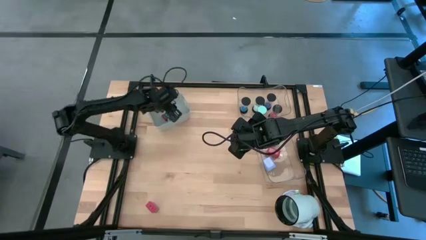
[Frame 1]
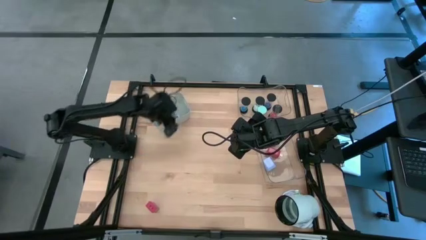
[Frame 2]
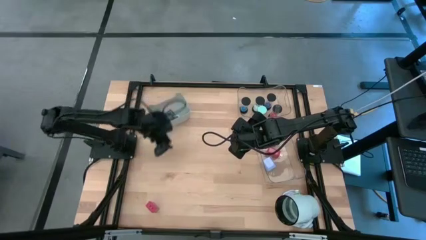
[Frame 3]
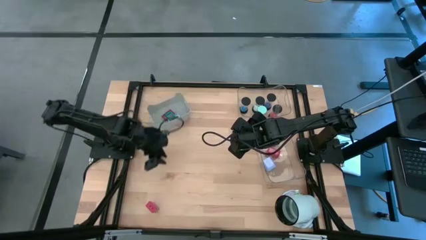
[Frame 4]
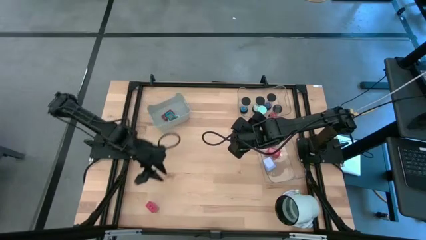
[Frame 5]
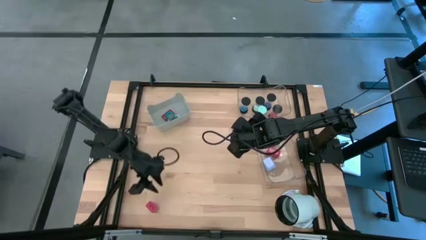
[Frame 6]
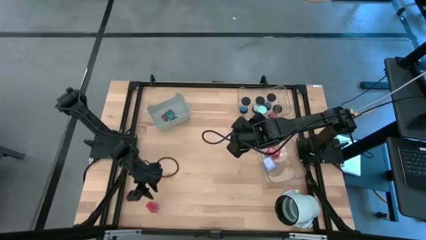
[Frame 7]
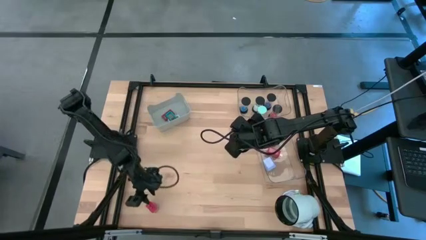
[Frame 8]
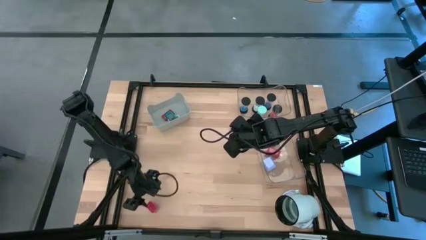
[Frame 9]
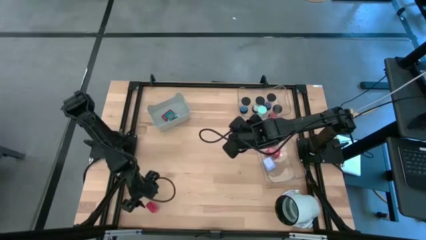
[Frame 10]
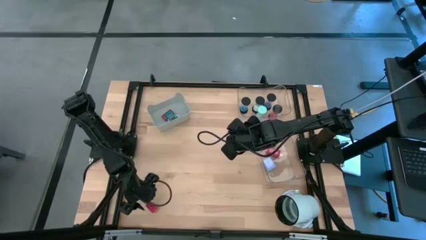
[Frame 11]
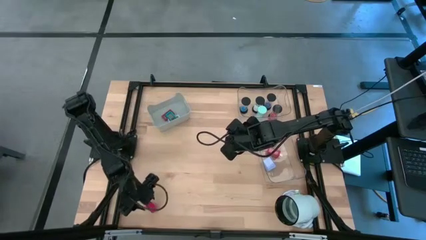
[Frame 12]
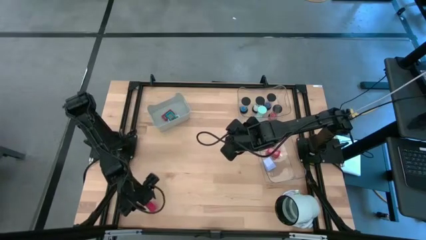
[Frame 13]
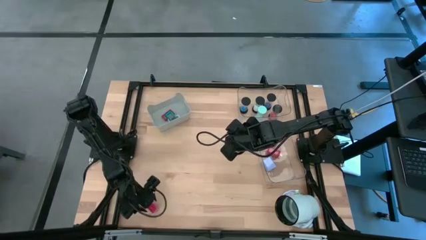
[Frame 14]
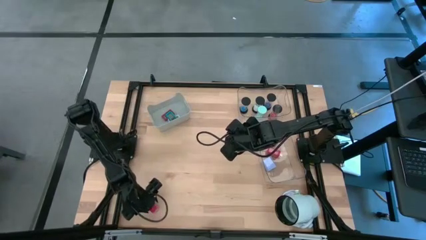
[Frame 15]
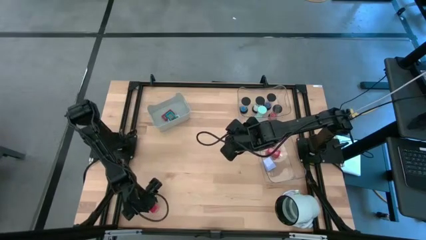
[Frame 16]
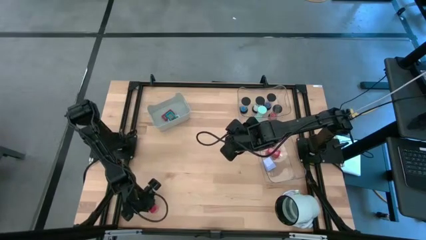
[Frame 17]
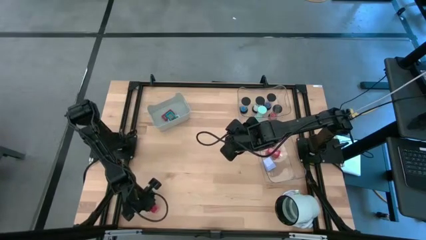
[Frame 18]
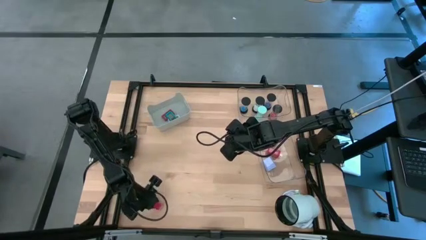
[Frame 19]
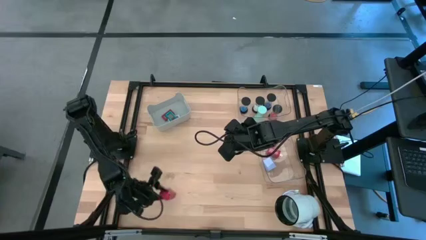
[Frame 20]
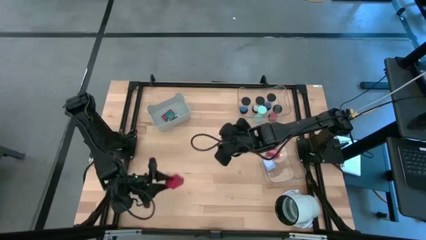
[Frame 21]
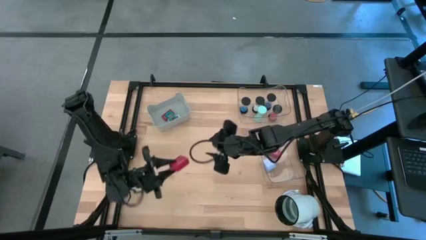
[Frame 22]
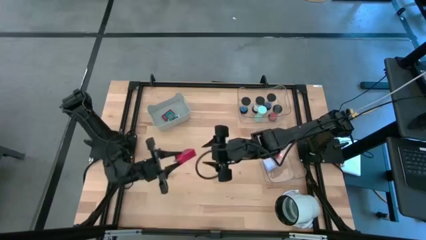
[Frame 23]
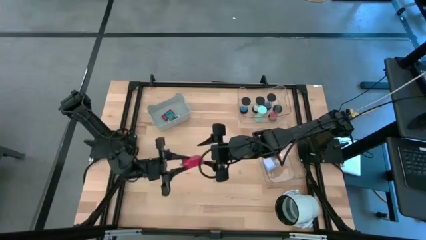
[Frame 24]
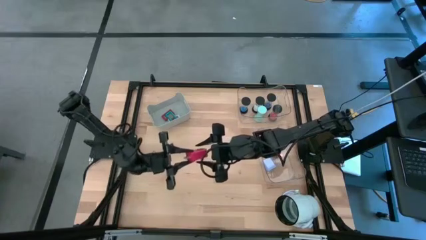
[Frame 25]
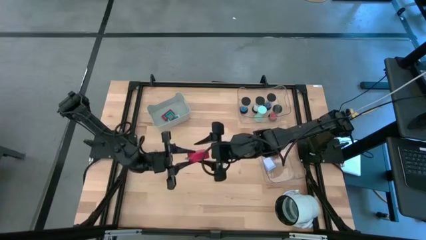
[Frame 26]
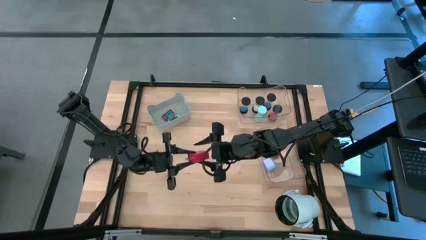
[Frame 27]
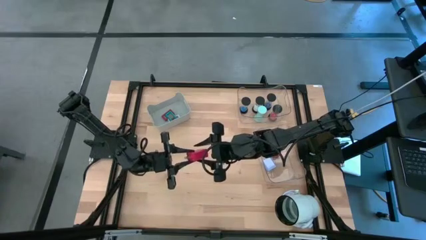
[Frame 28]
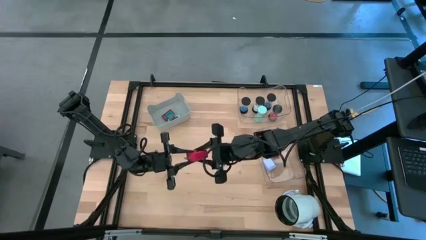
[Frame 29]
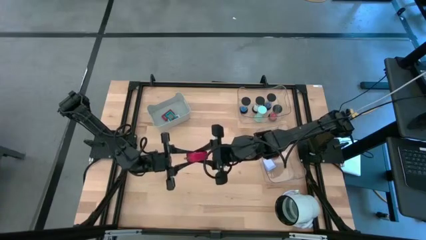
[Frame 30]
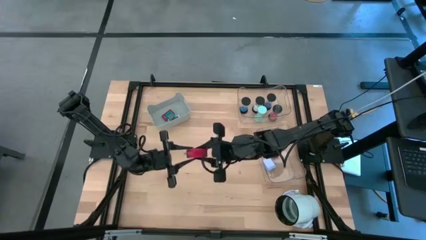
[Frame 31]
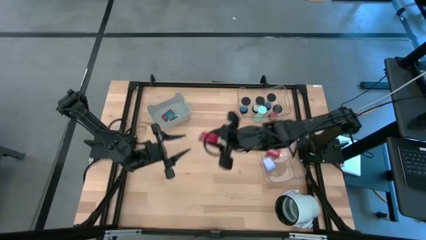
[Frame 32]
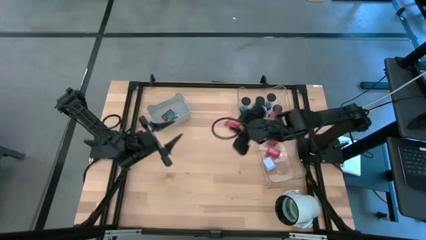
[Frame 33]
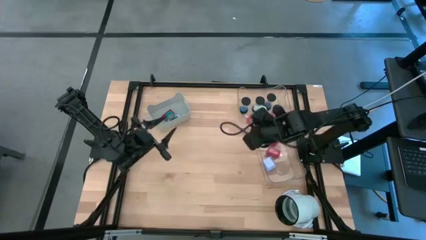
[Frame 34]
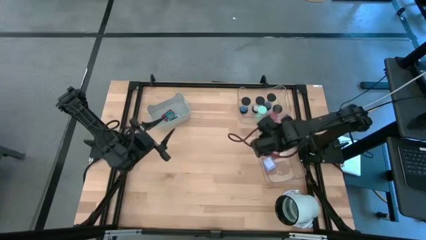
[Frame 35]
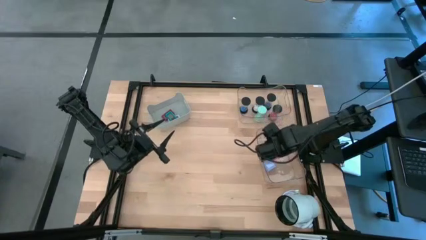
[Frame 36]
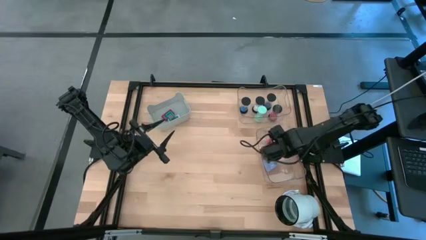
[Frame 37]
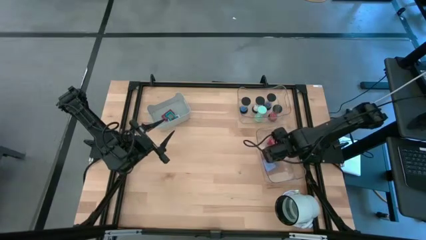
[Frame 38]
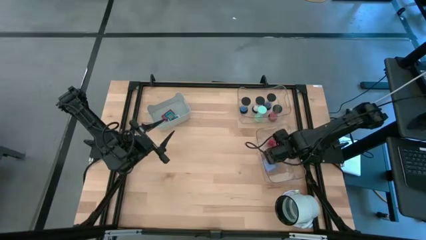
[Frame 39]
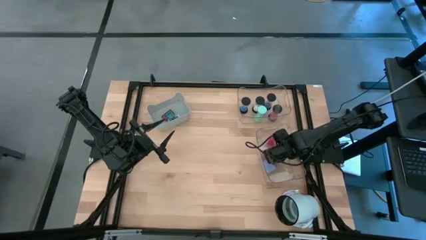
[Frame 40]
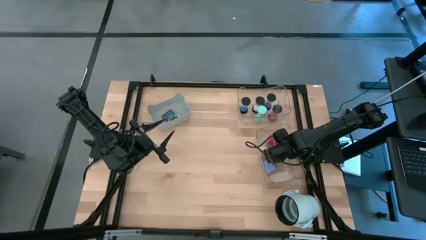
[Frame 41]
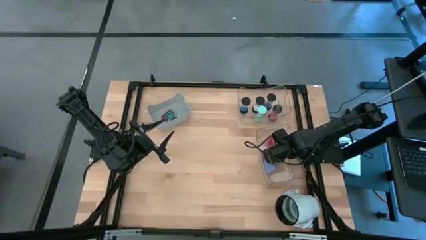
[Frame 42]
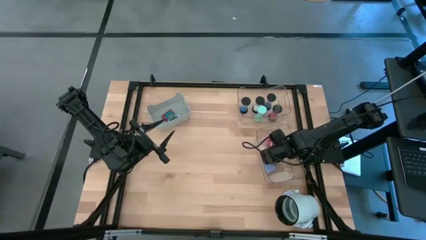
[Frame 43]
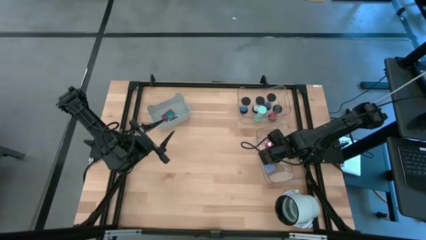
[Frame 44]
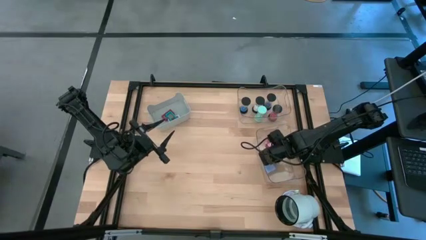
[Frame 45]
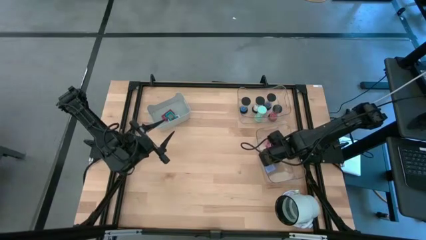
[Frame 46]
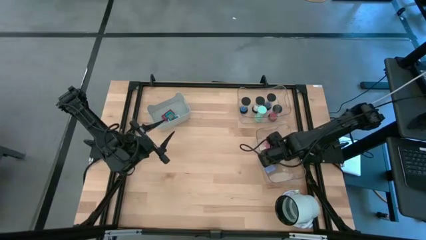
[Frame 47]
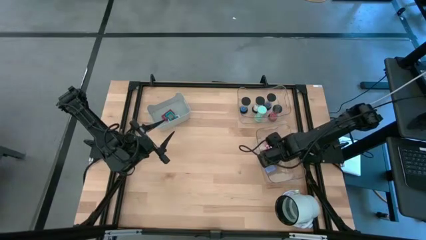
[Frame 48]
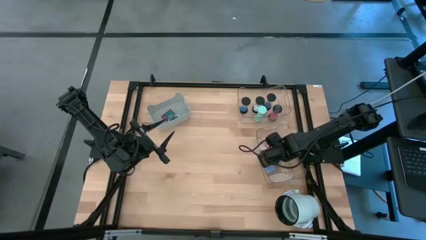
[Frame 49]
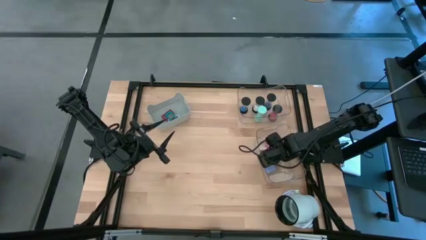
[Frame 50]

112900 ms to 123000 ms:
Task: Pick & Place Office items
Put the red charger adapter into the bottom transparent bin

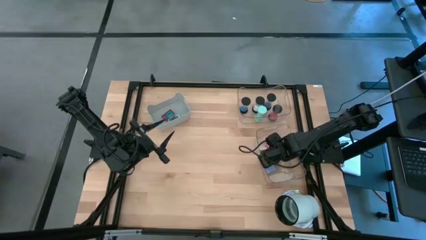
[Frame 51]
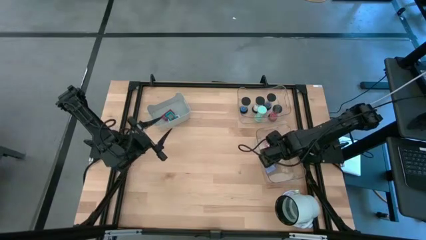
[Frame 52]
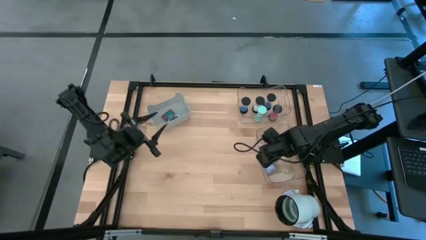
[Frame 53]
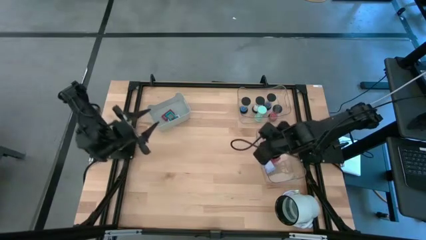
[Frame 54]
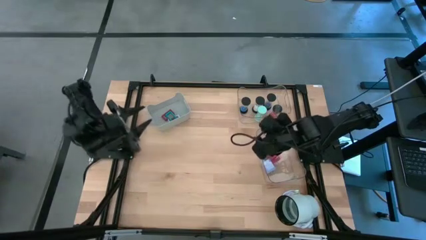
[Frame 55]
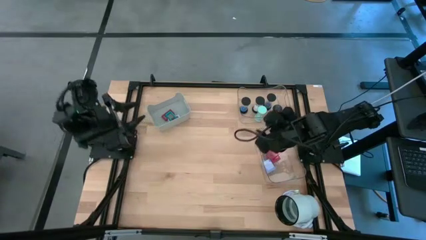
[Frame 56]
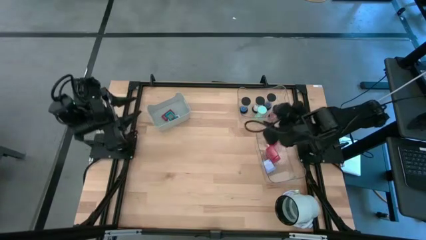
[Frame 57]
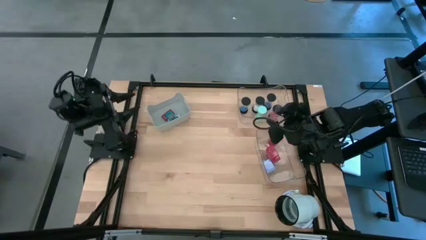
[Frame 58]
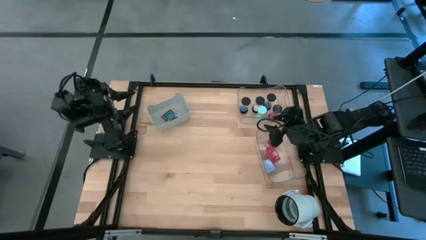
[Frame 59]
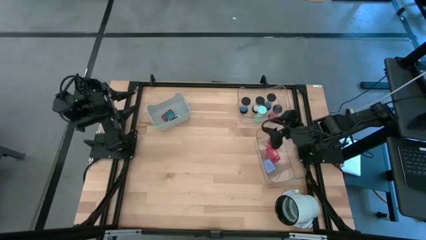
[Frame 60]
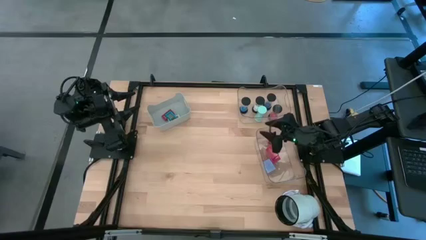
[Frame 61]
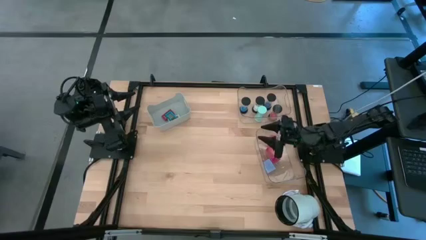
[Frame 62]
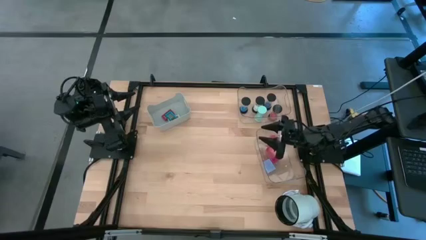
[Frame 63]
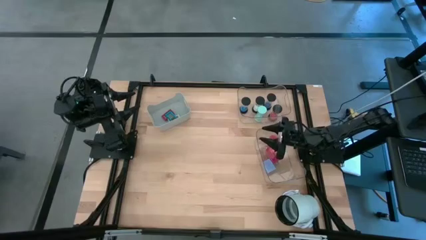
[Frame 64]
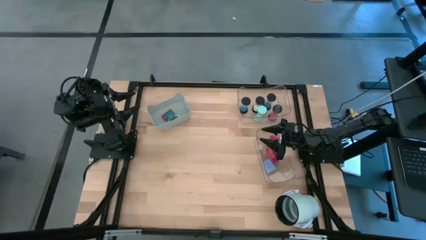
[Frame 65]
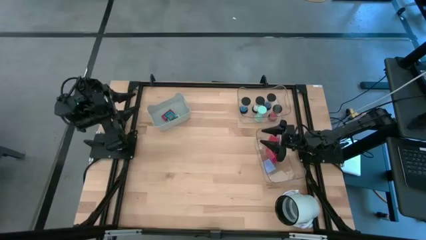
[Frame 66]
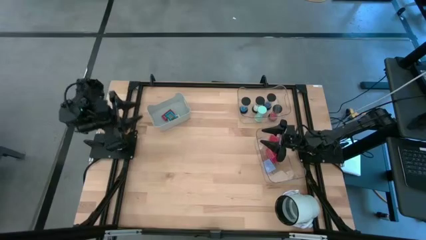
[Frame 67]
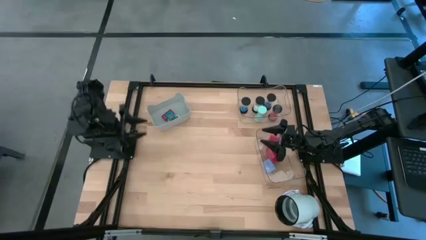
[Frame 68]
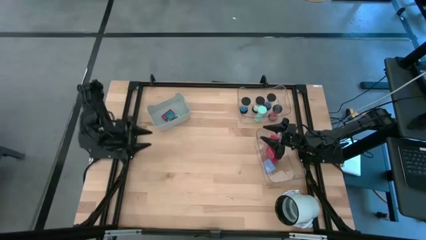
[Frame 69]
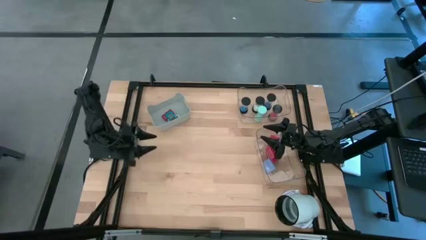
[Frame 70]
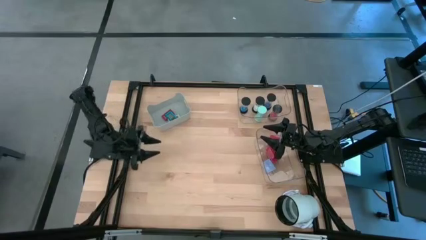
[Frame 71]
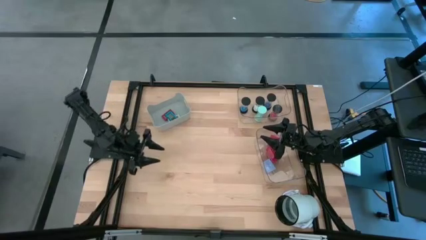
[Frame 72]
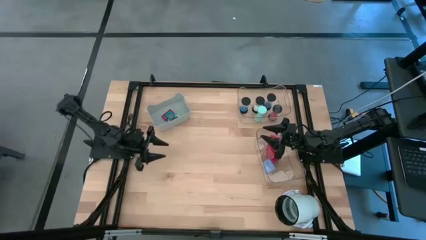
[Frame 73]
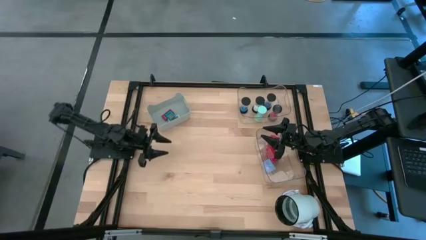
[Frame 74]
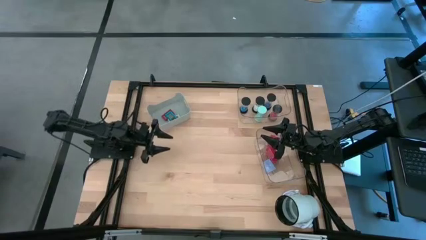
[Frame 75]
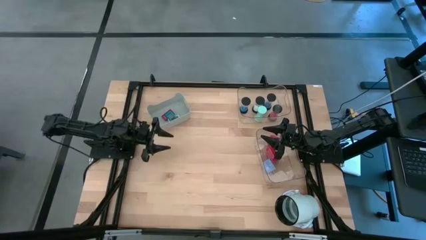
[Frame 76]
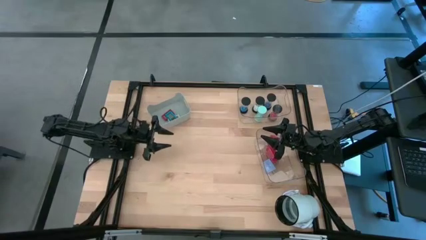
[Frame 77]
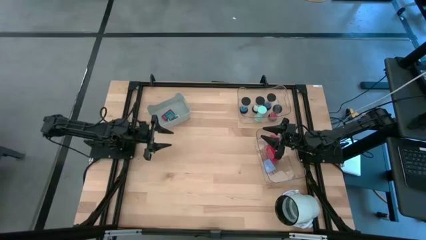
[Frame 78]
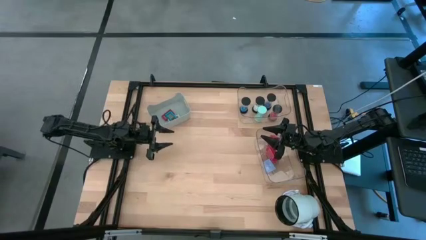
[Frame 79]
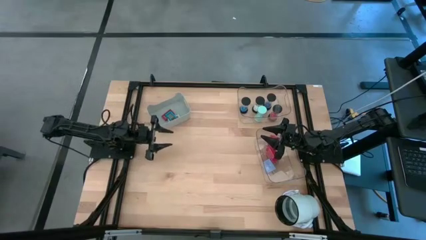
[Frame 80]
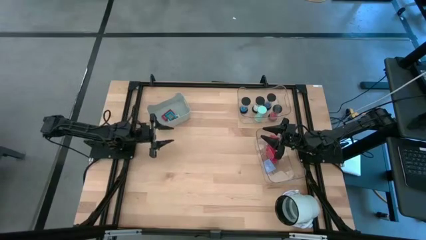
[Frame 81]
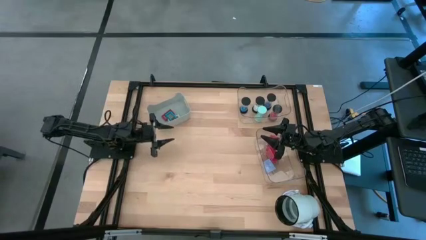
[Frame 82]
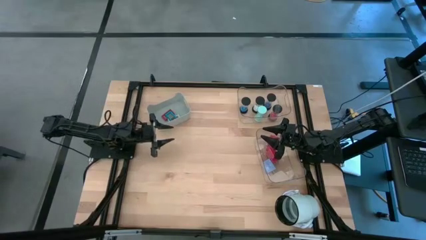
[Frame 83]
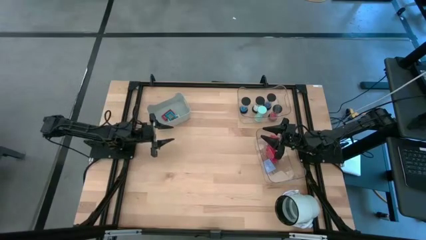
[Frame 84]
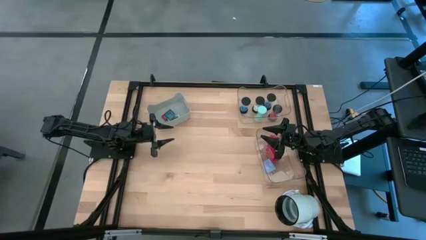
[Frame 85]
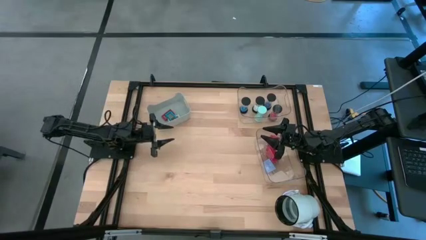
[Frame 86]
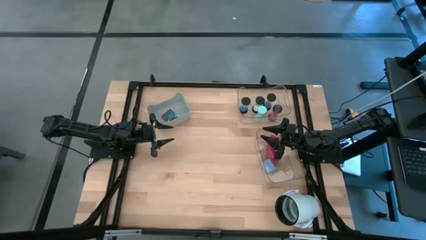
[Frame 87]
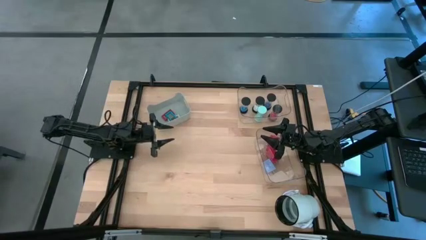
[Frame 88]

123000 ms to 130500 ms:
Return to Home Position
